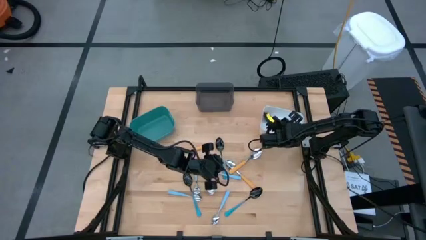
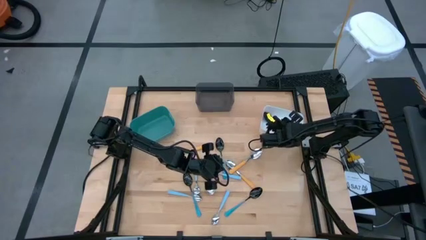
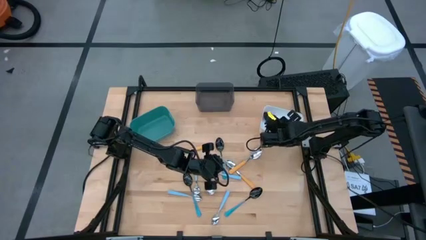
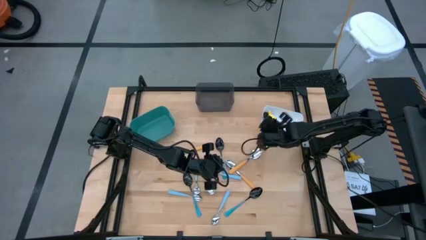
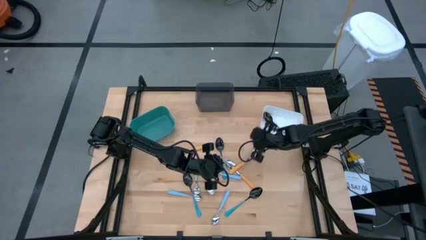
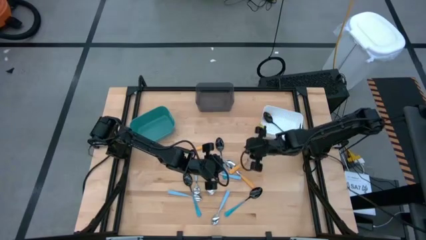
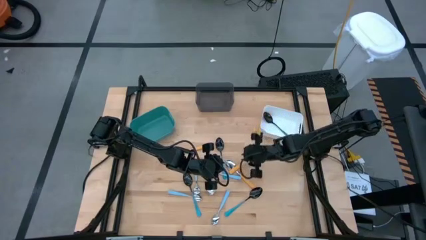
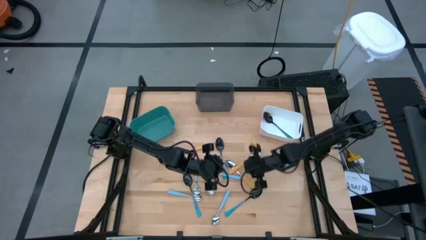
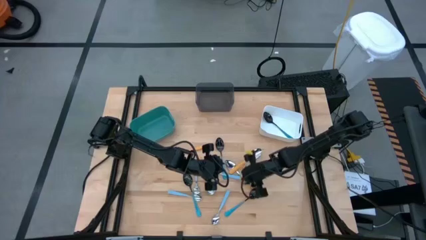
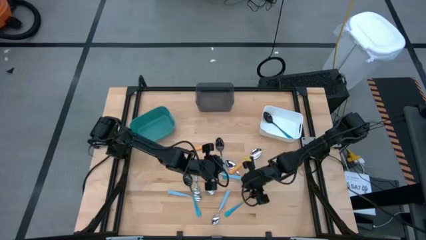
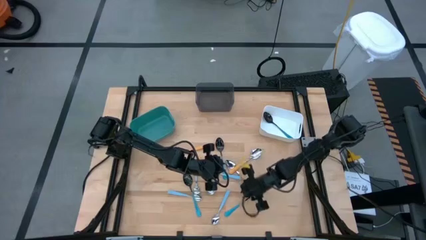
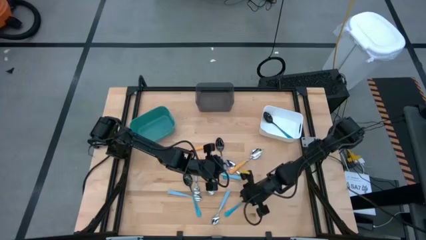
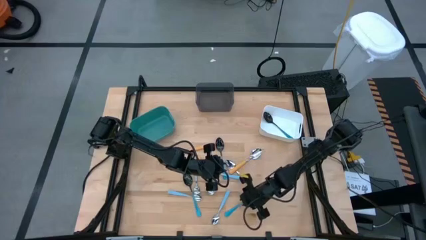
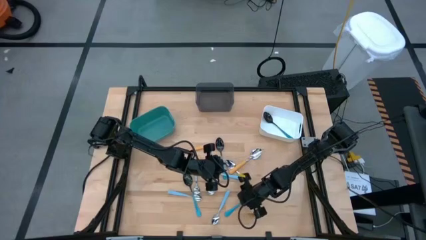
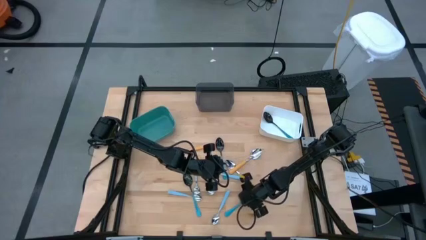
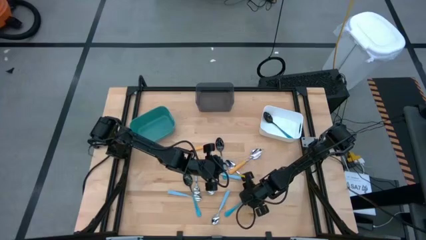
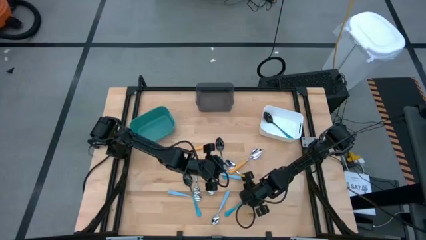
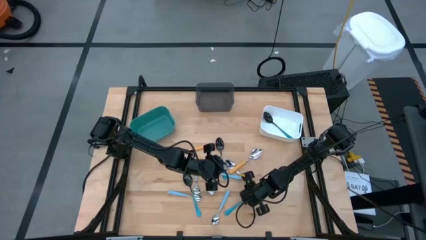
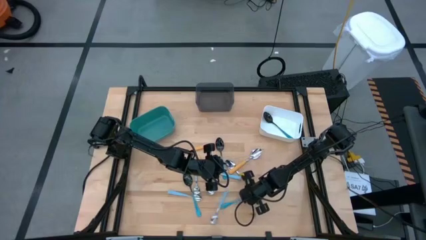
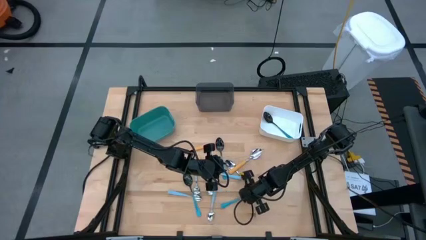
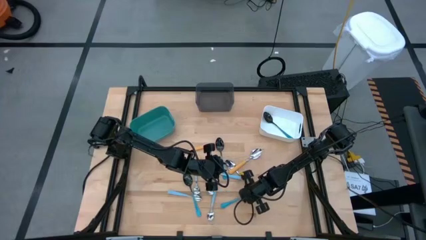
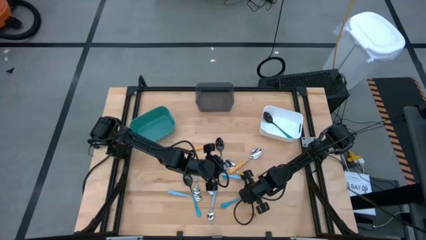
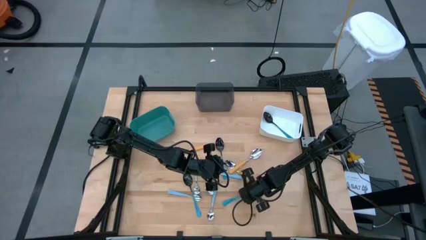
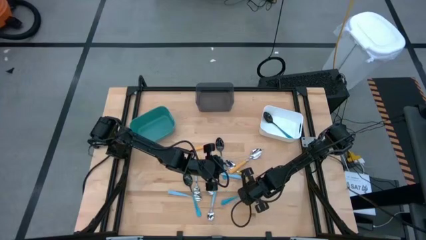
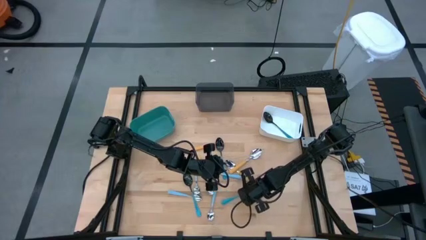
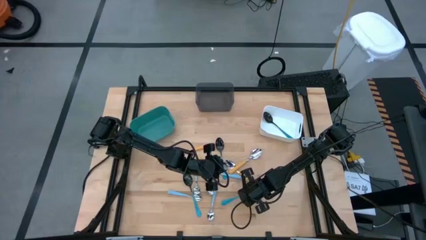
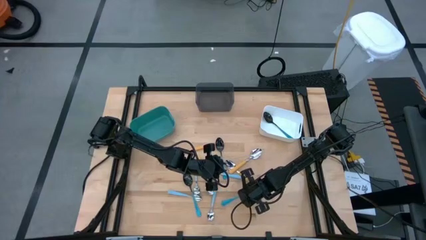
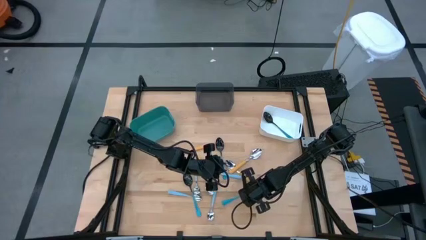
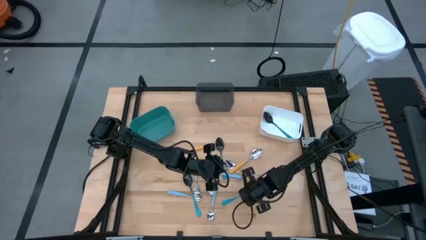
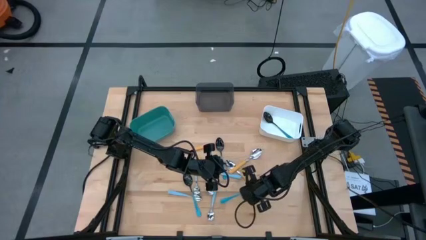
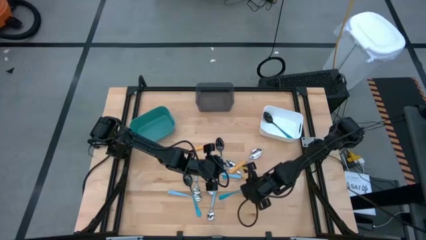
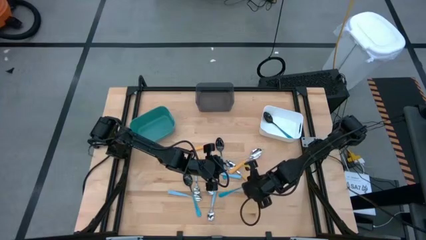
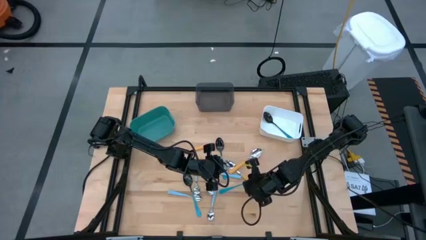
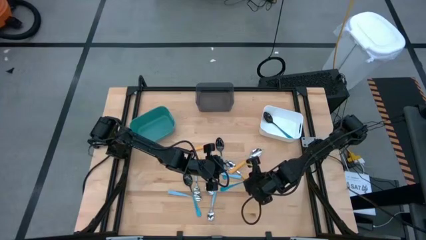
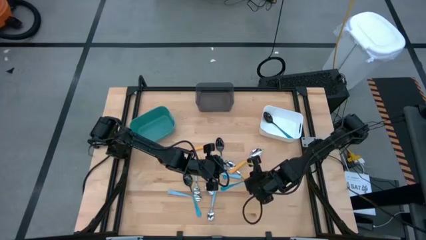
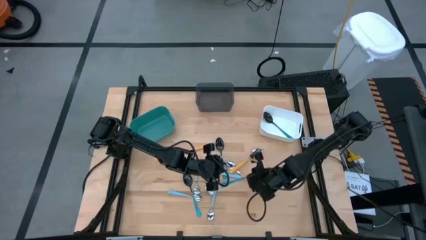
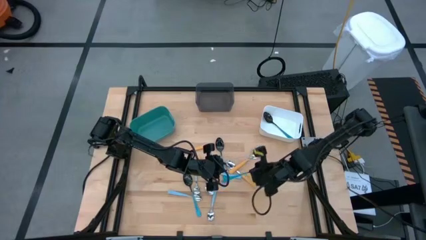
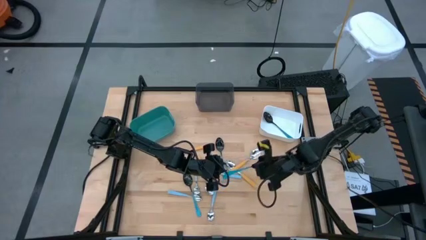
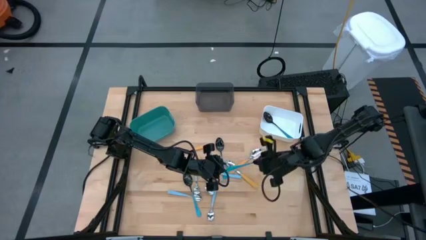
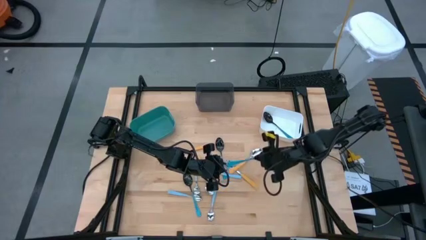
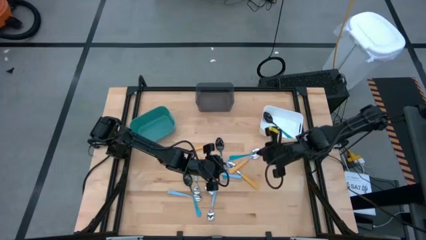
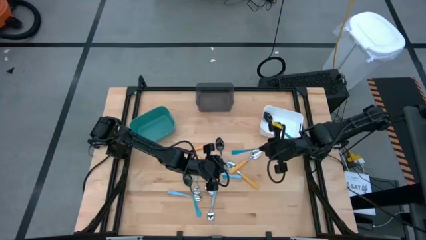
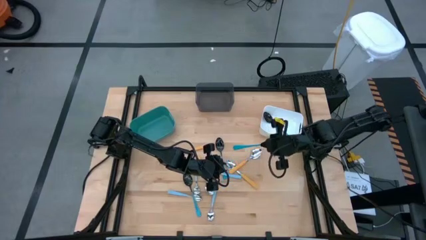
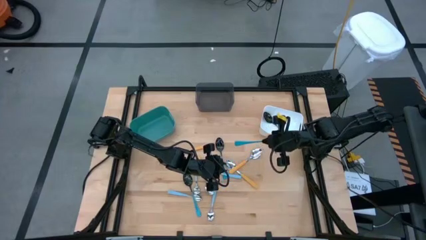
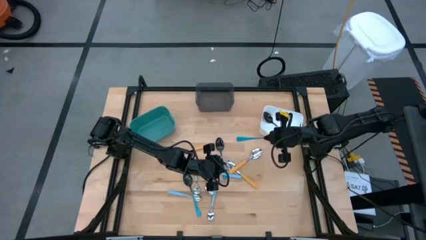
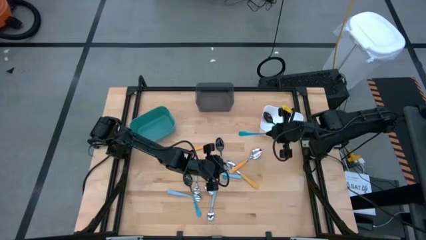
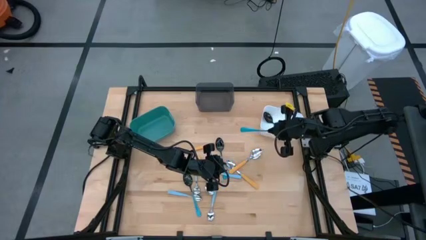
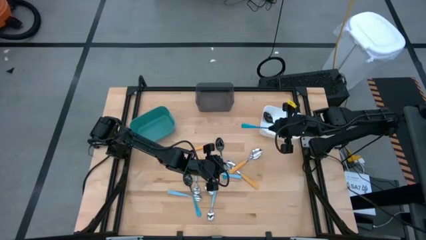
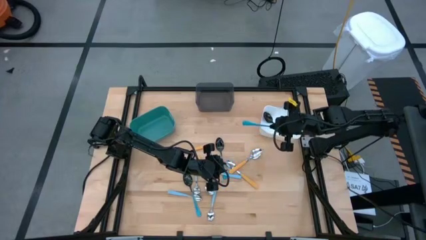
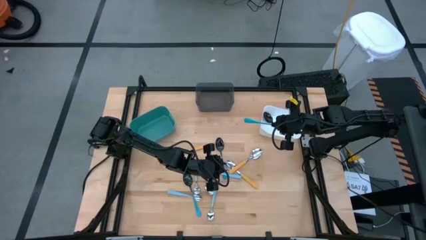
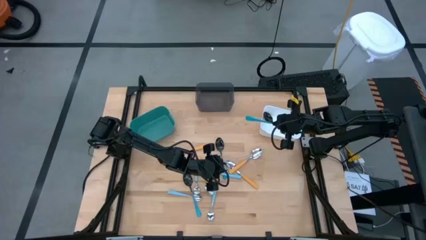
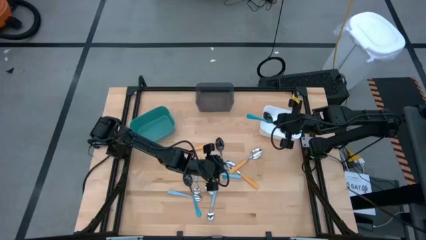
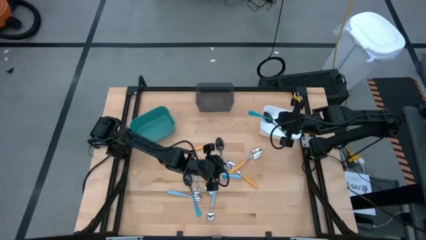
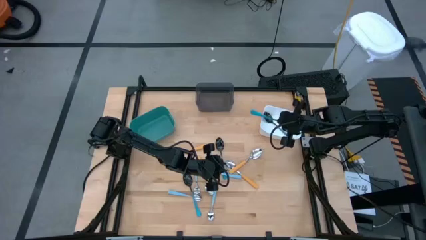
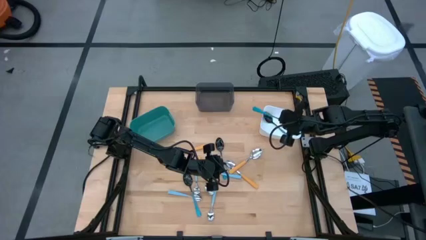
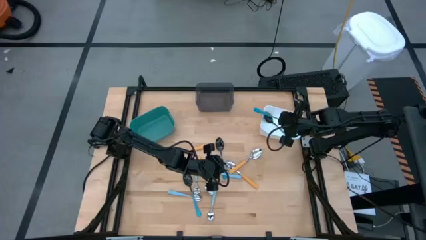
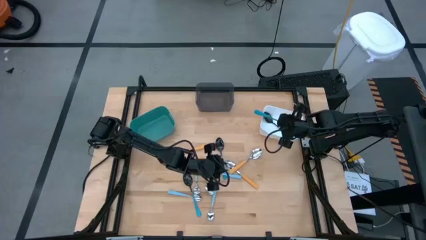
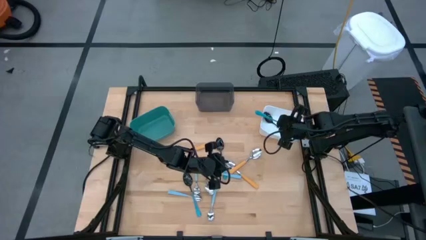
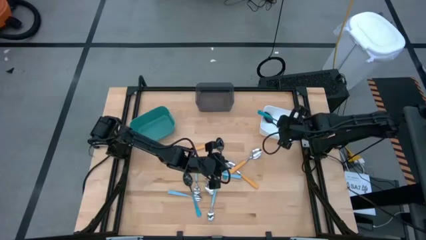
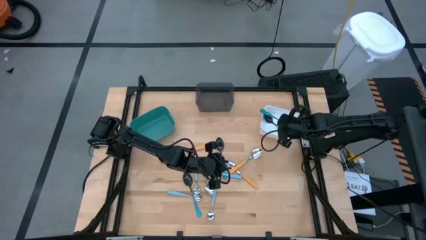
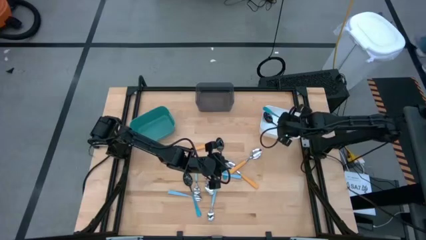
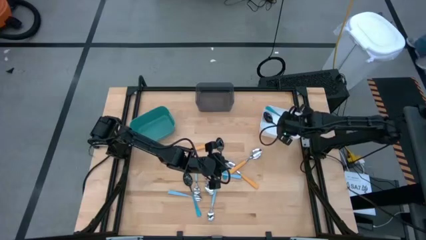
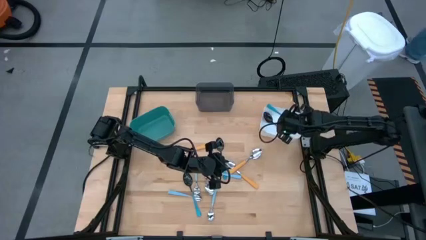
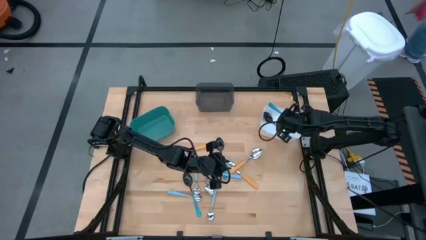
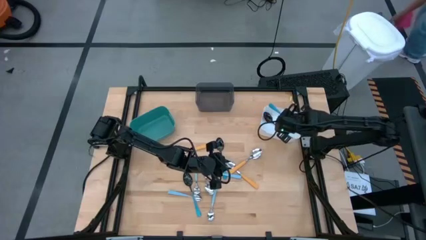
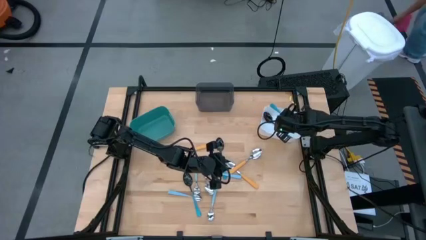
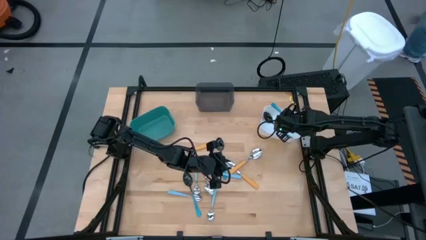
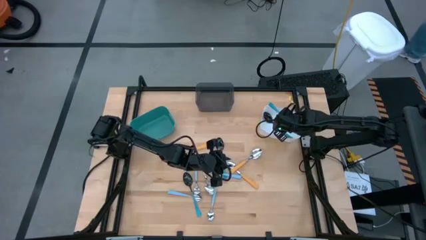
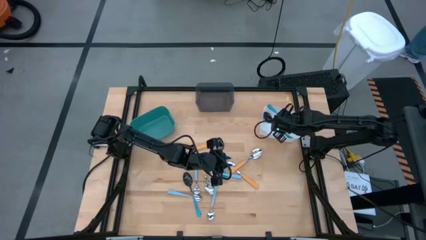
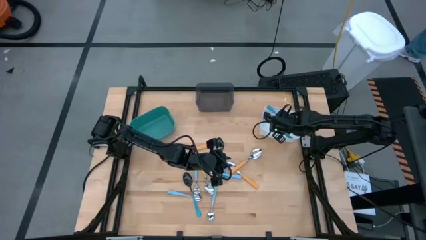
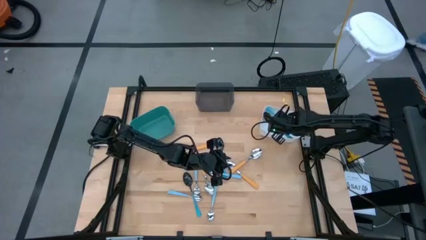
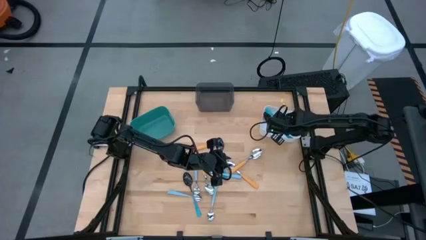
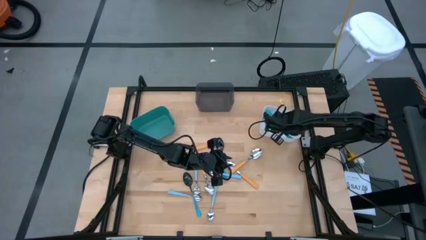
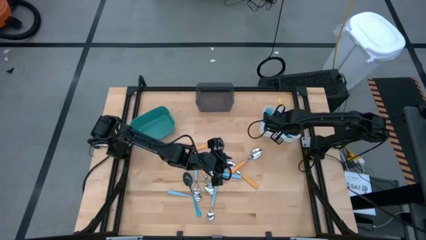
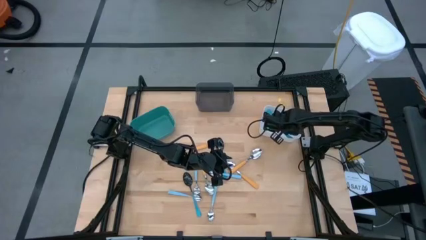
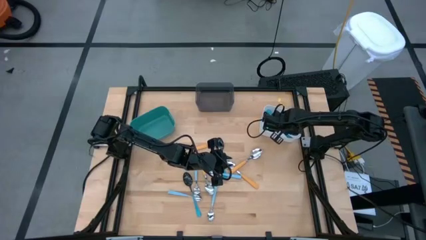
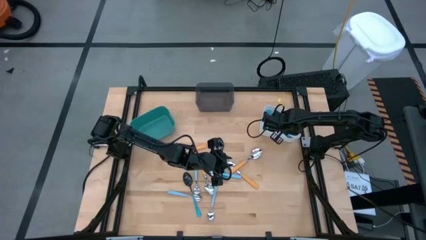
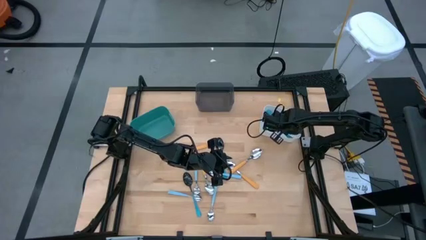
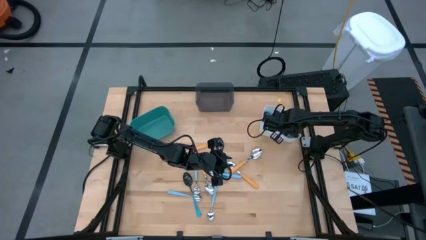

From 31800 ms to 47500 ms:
Task: Sort silverware by color (type)
Put the blue spoon into the white bin
